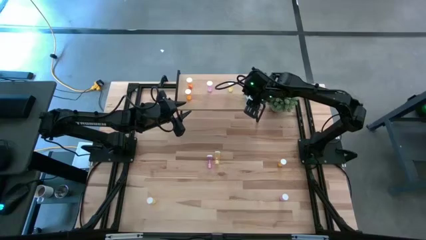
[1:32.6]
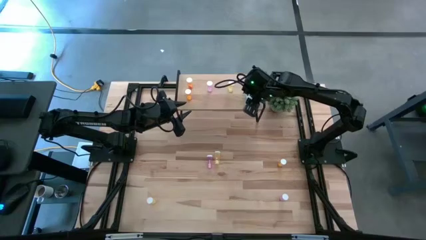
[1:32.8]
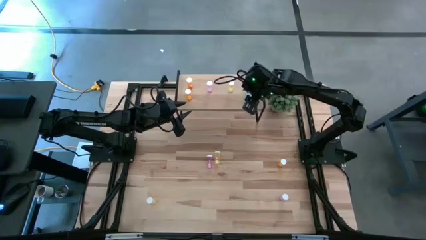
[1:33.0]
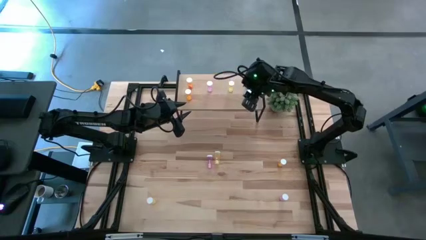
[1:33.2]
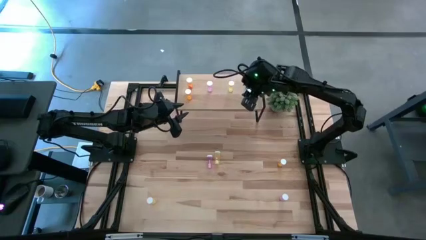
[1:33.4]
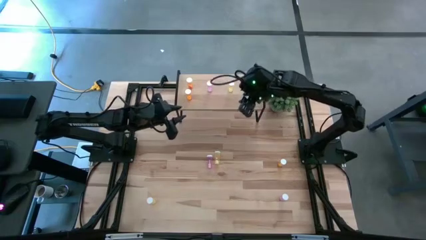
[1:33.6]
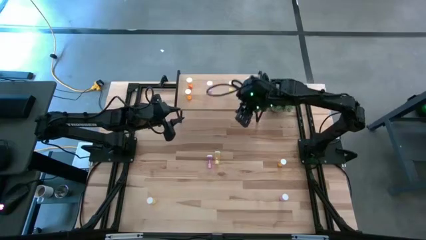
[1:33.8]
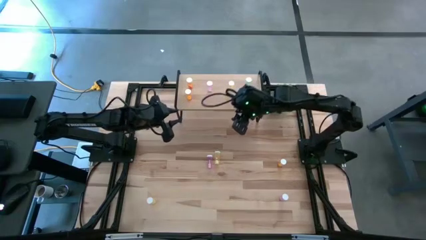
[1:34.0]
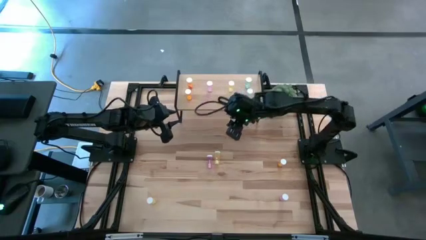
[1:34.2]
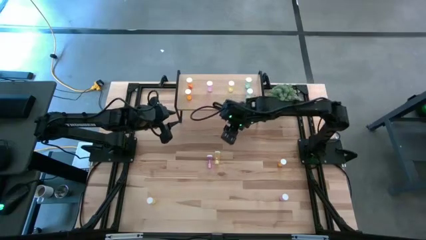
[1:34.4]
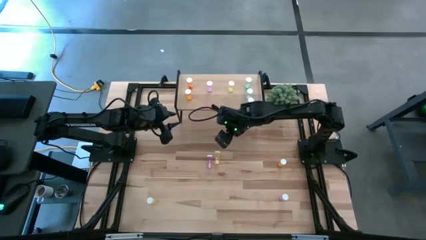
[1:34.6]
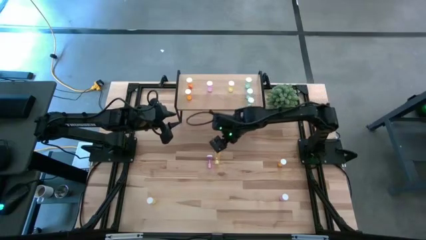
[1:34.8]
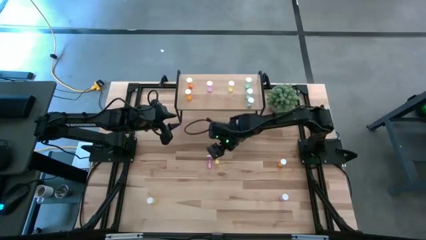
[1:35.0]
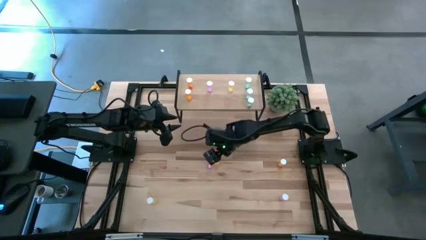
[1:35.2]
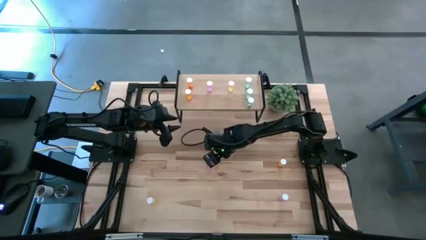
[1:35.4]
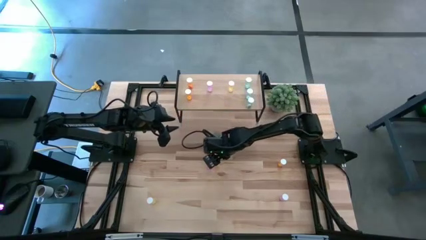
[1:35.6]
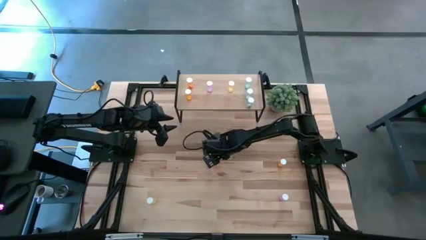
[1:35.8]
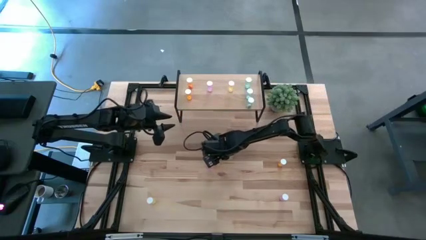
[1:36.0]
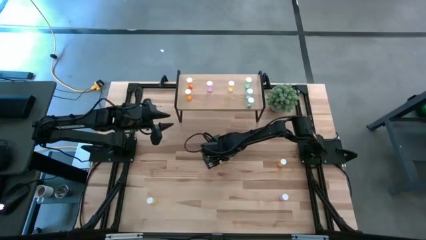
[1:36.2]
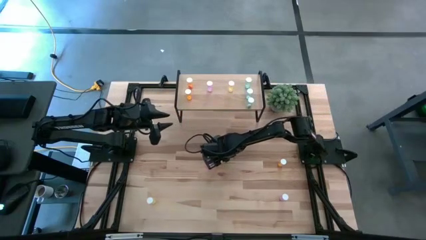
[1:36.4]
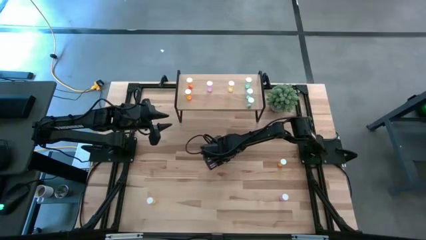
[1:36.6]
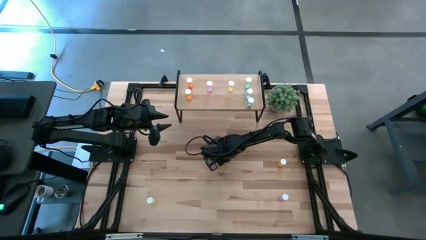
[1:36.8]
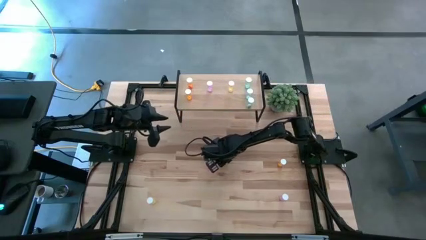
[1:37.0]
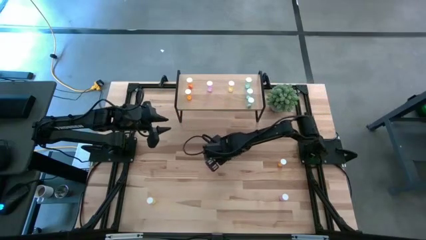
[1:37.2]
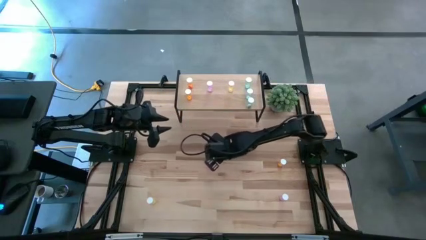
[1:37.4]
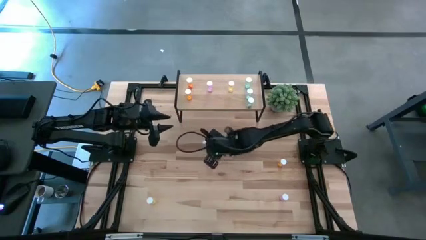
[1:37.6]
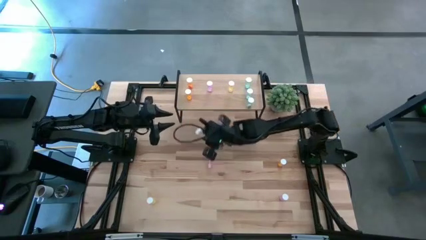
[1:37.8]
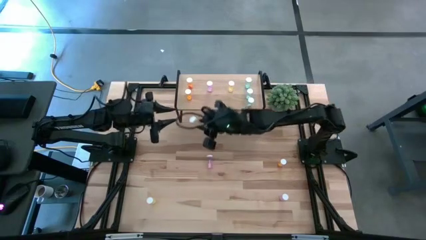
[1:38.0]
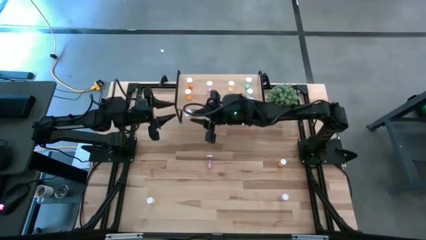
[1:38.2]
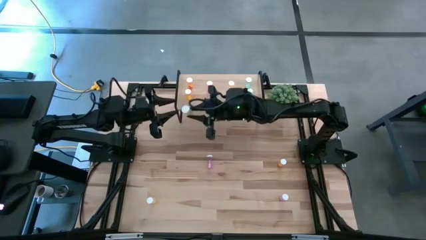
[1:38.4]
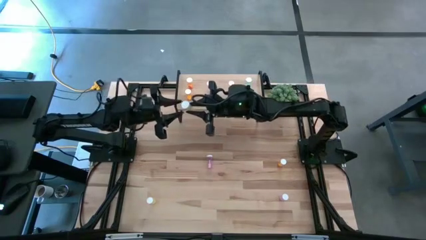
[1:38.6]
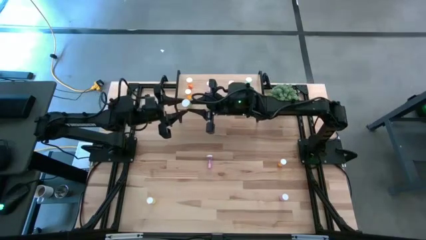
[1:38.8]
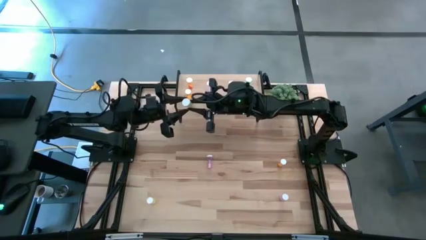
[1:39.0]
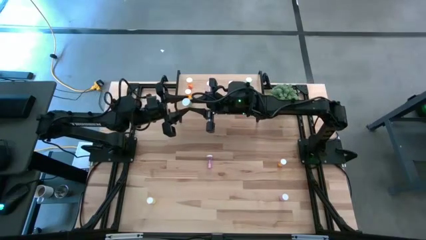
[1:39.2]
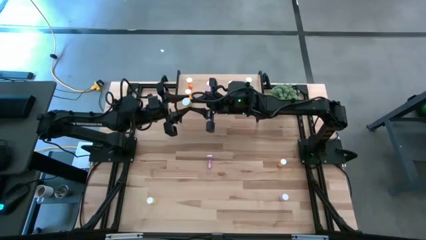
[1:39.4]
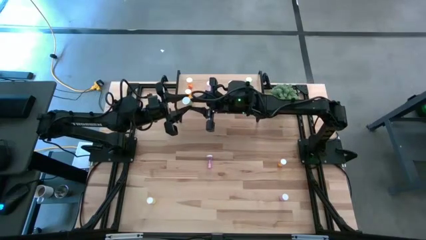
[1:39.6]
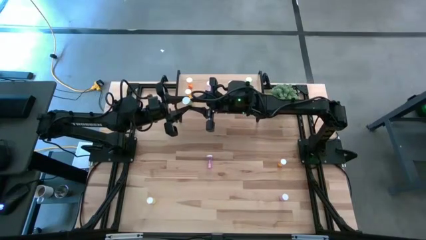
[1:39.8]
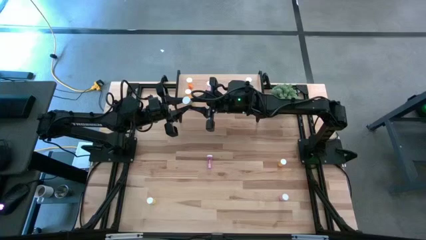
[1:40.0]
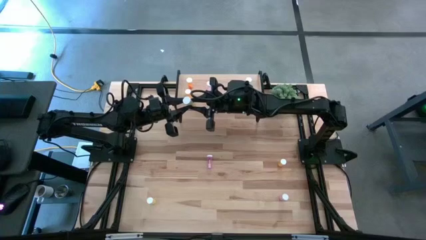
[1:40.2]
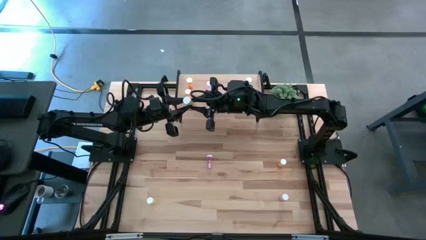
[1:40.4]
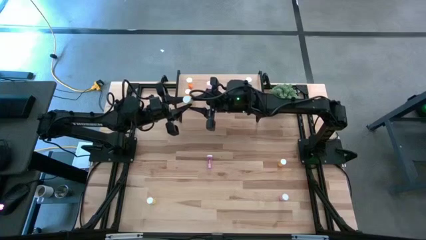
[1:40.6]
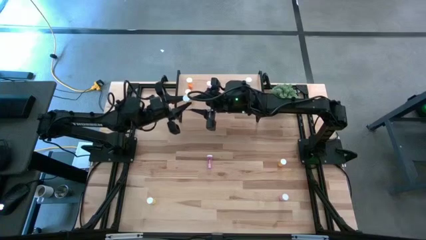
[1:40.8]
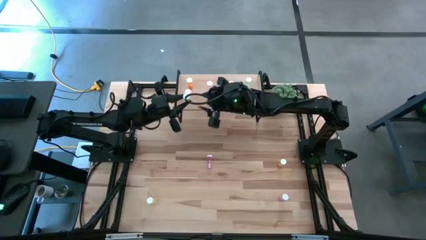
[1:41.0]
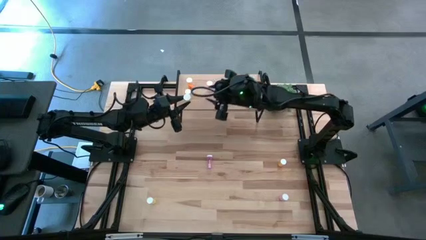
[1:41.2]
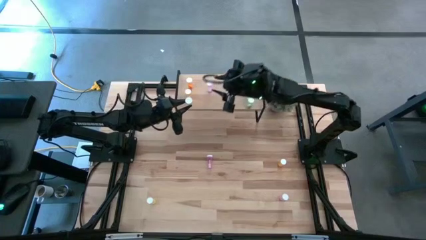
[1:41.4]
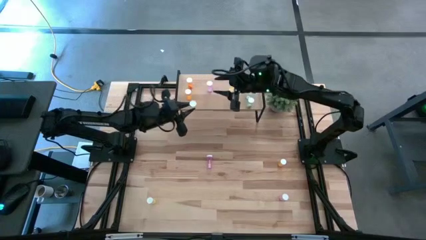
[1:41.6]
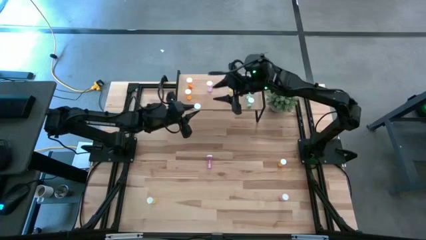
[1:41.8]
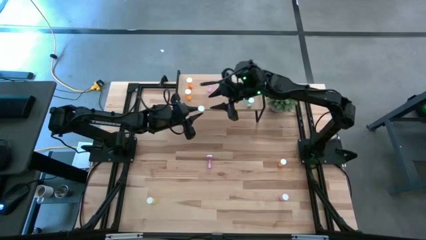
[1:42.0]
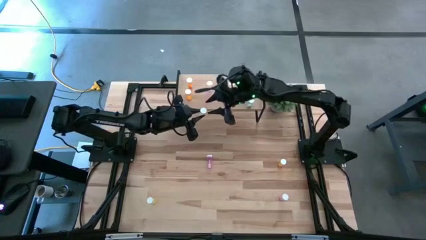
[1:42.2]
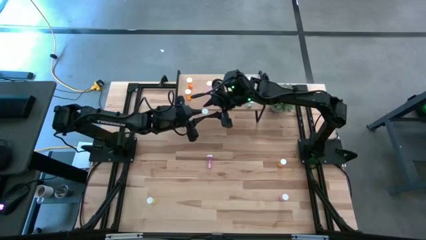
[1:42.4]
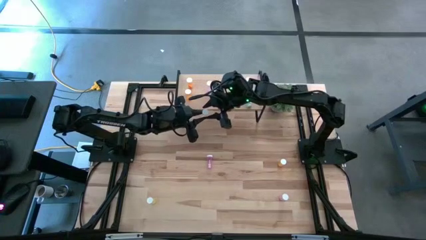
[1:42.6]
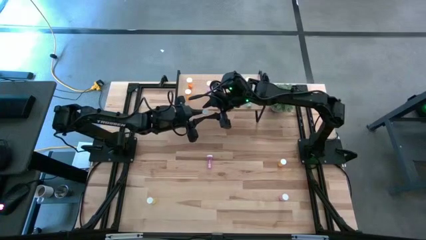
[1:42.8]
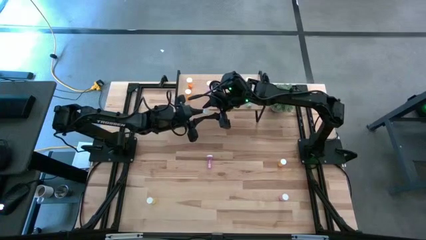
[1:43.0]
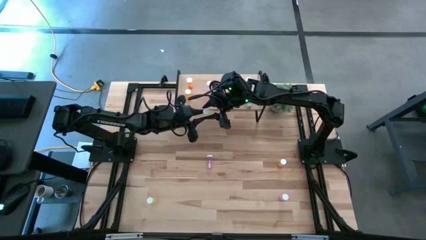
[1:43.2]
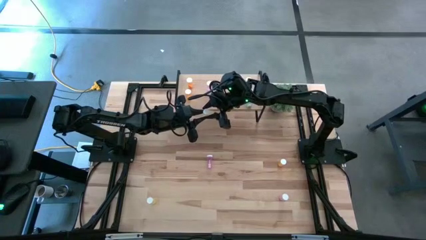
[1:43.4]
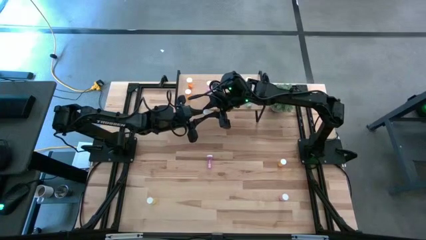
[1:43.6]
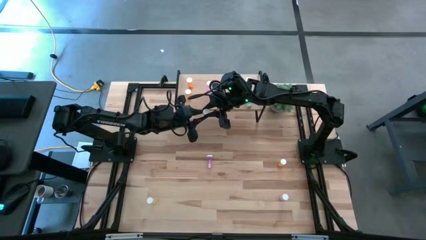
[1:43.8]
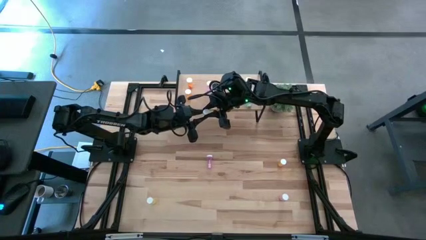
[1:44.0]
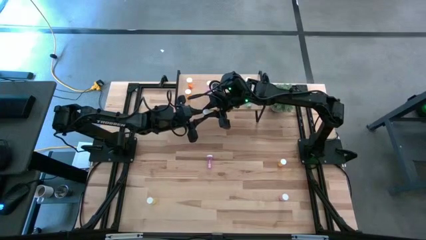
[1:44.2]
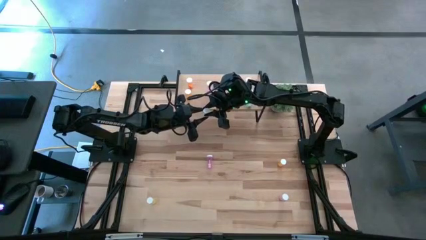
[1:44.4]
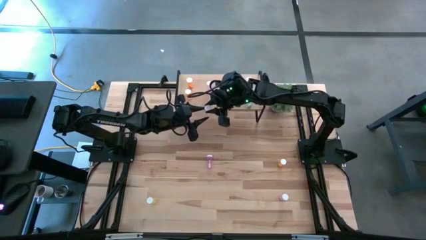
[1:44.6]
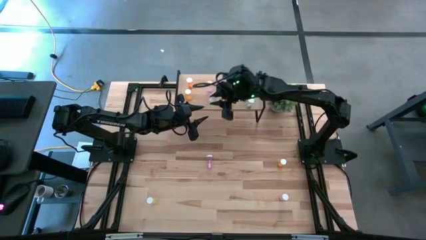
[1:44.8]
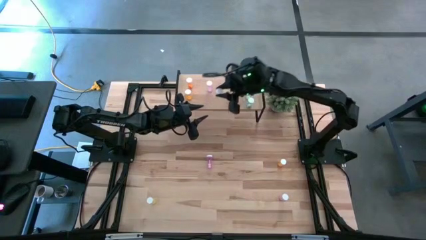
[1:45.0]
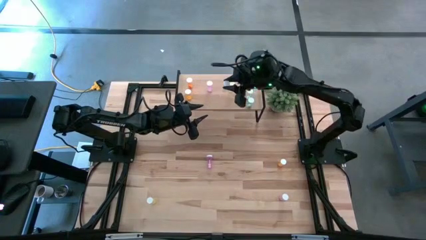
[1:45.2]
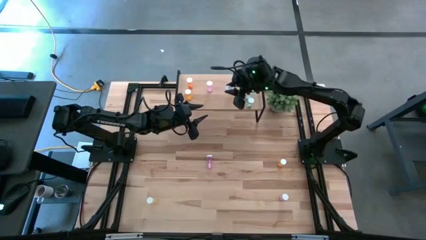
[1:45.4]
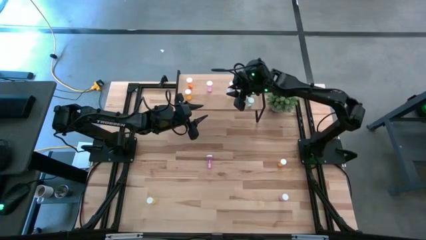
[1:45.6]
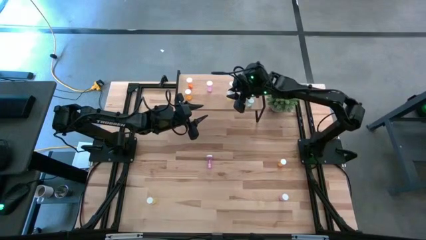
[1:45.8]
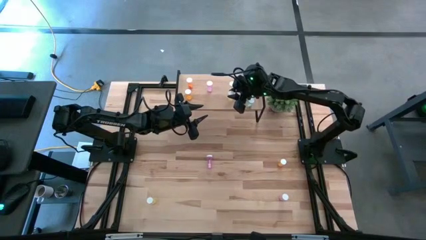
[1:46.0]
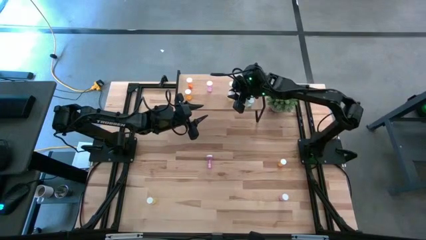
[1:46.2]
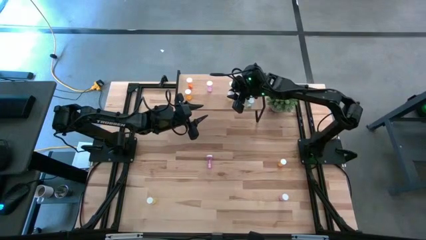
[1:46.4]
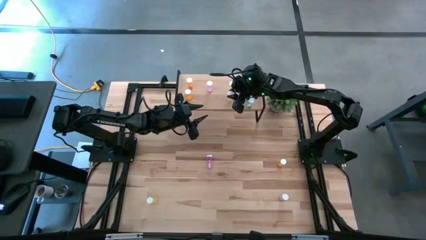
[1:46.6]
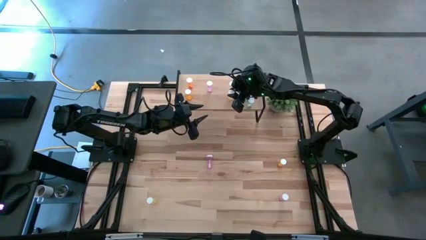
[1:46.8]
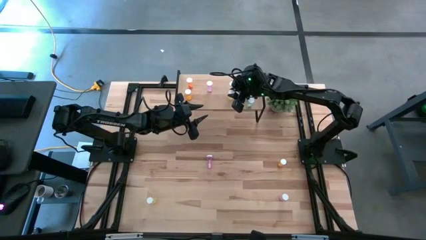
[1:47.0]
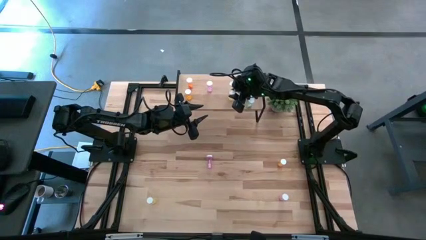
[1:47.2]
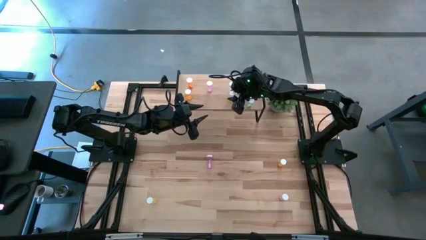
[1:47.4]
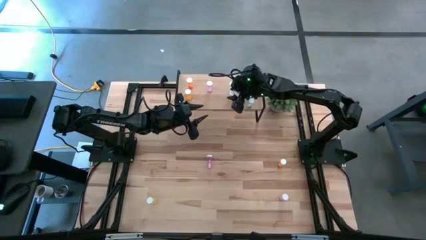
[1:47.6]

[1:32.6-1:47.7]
Task: Pick and place medicine bottles onto shelf by color
Put the top yellow pill bottle on the shelf aligned with the other yellow pill bottle

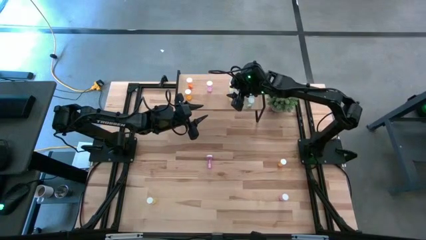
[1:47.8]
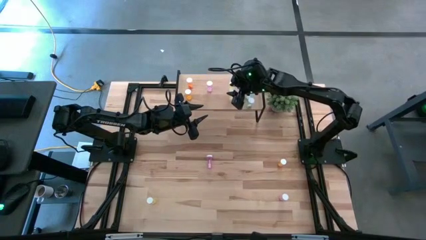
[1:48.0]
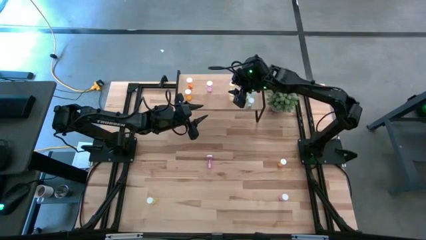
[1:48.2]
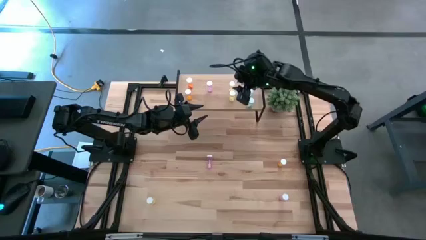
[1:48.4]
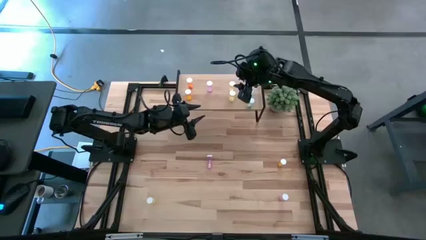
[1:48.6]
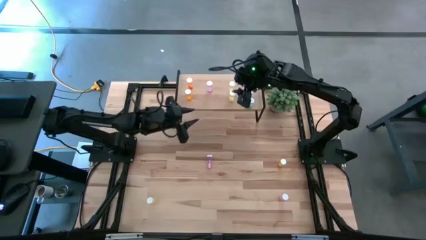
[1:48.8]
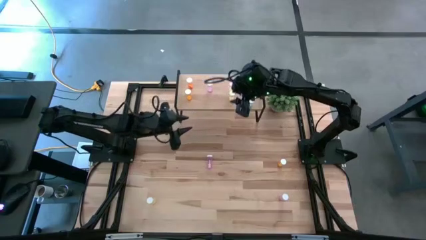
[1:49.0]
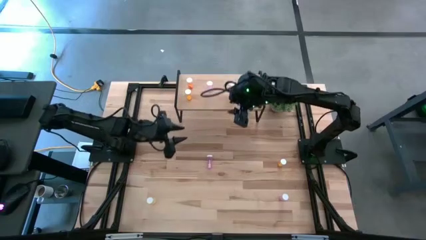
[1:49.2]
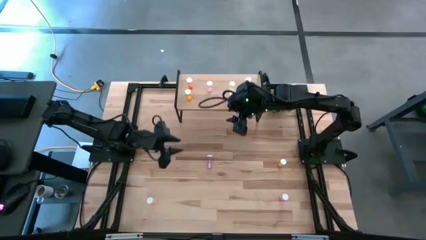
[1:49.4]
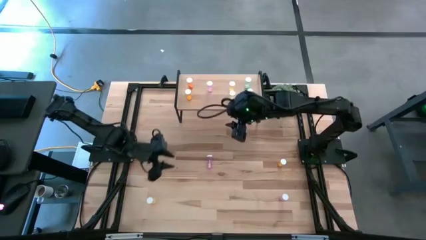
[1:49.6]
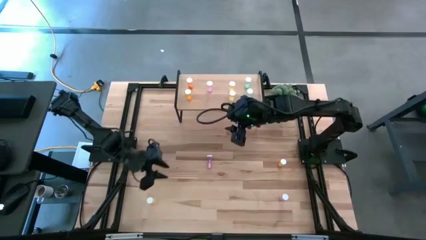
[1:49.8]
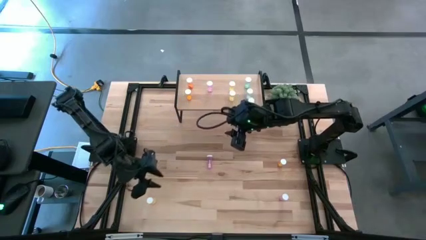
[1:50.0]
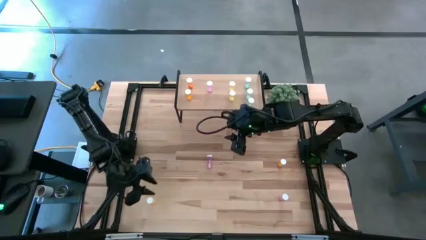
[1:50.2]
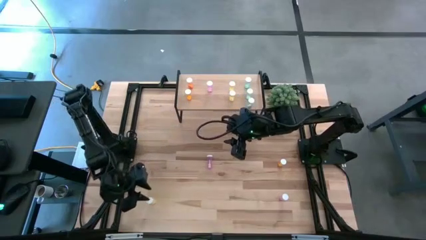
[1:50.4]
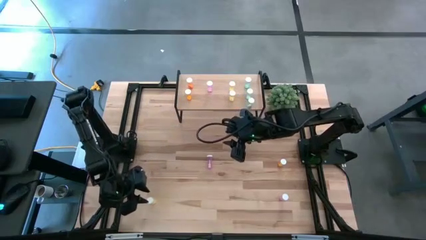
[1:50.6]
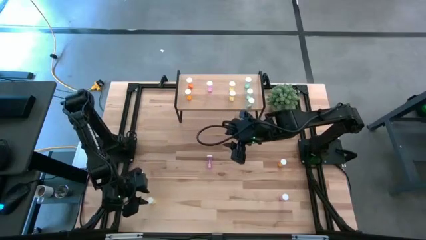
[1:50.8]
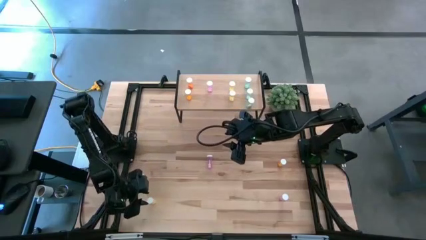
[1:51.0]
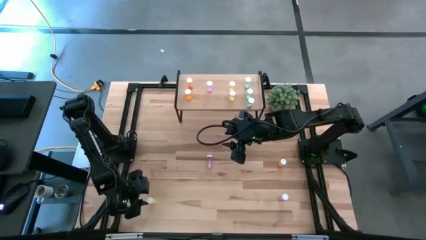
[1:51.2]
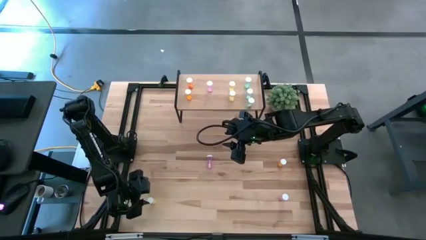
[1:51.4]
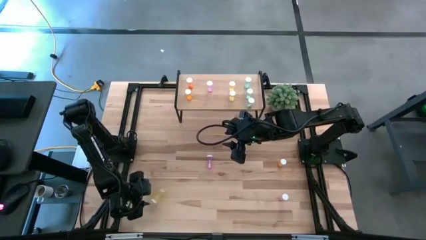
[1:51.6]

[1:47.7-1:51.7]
Put the yellow pill bottle on the shelf aligned with the other yellow pill bottles
